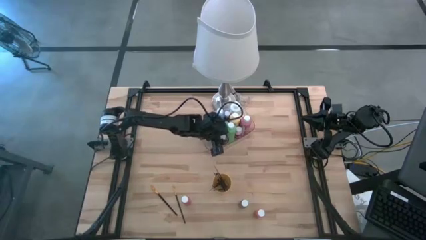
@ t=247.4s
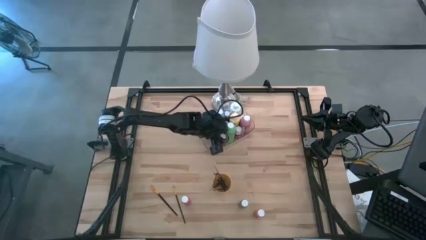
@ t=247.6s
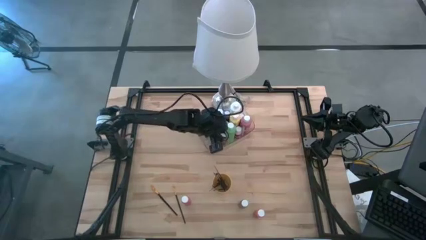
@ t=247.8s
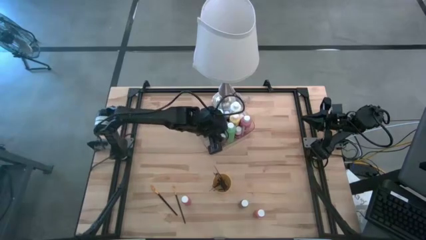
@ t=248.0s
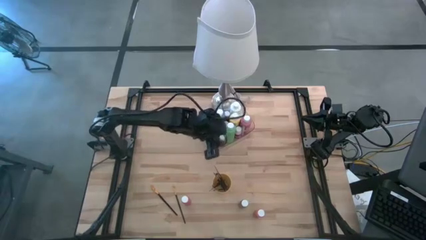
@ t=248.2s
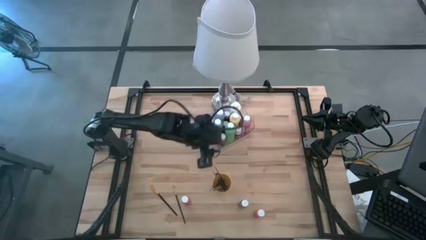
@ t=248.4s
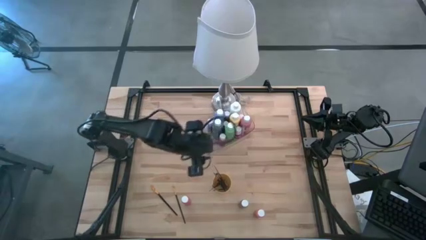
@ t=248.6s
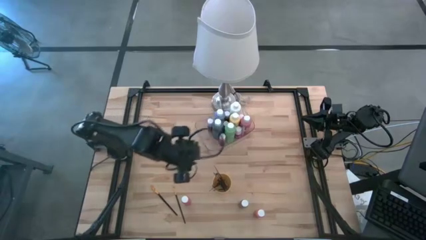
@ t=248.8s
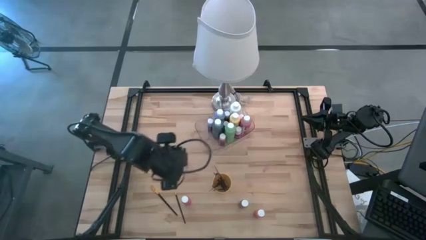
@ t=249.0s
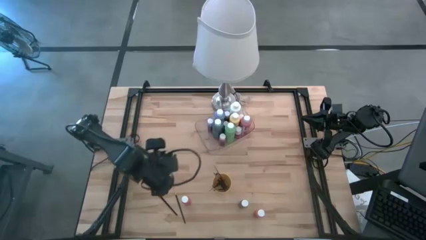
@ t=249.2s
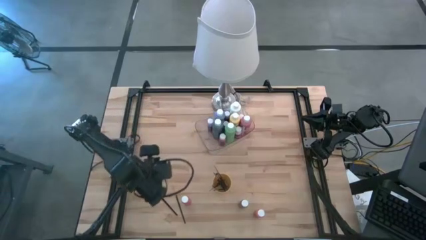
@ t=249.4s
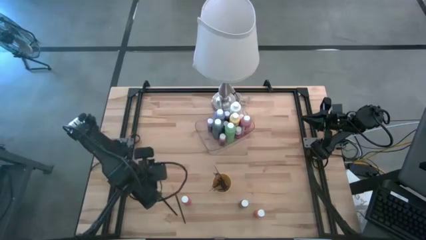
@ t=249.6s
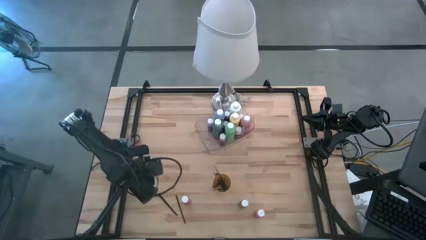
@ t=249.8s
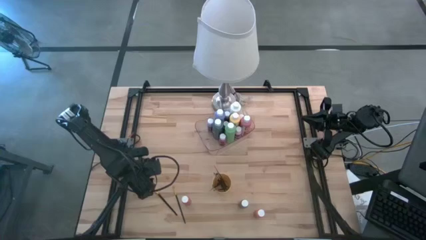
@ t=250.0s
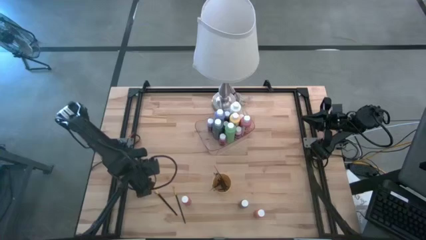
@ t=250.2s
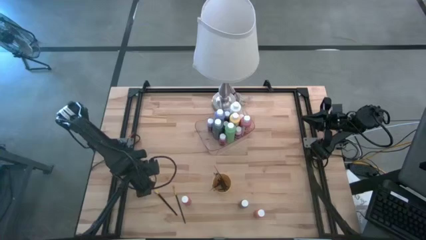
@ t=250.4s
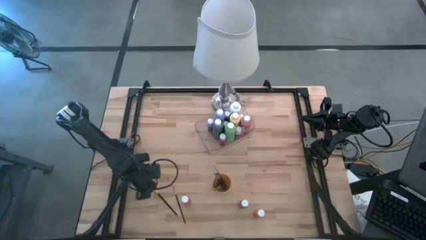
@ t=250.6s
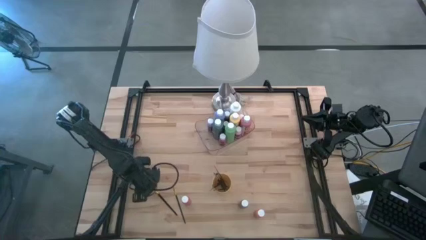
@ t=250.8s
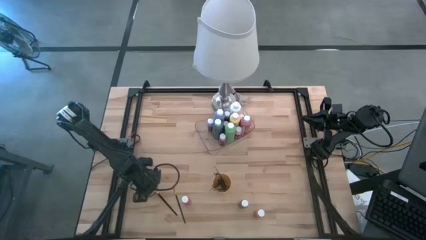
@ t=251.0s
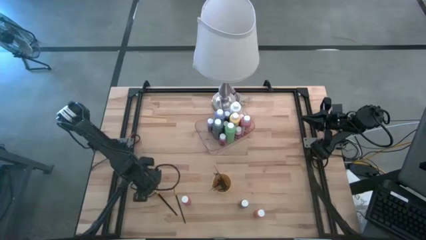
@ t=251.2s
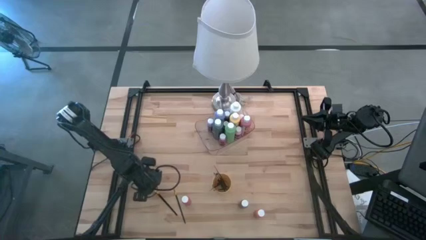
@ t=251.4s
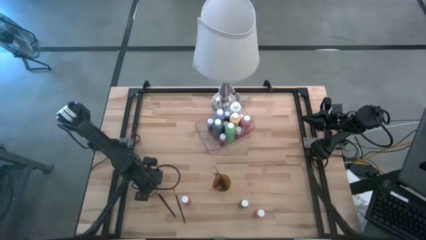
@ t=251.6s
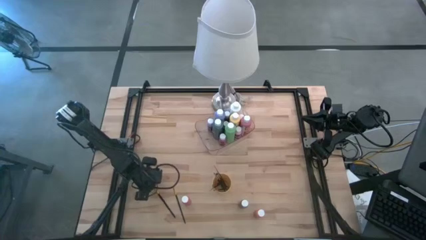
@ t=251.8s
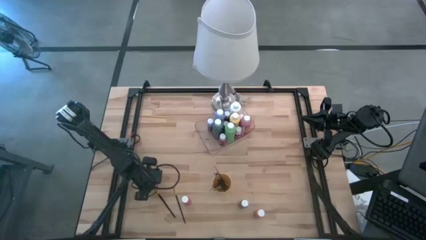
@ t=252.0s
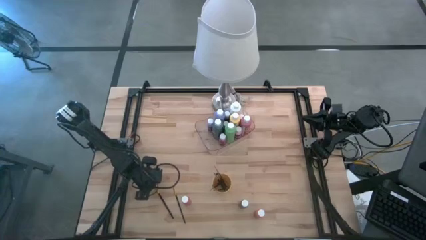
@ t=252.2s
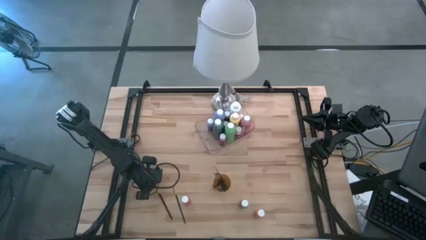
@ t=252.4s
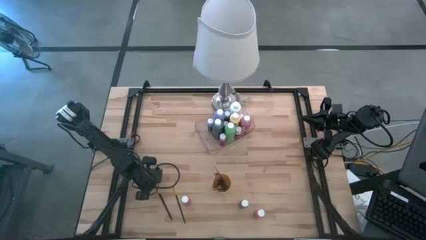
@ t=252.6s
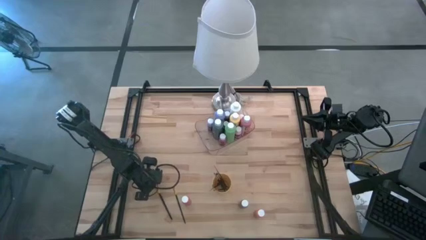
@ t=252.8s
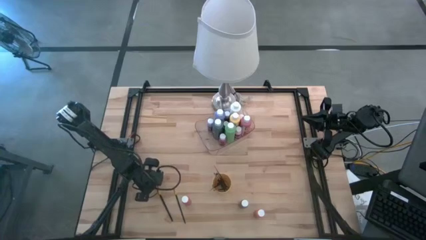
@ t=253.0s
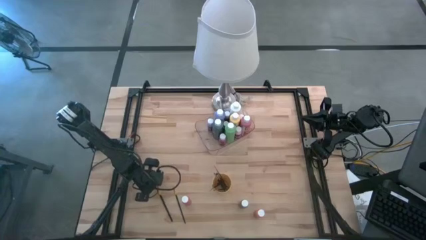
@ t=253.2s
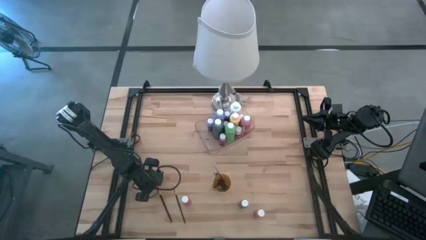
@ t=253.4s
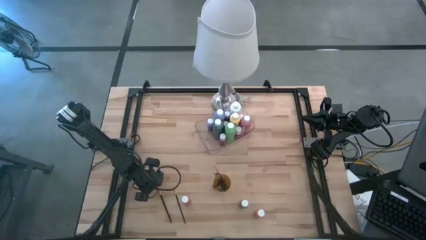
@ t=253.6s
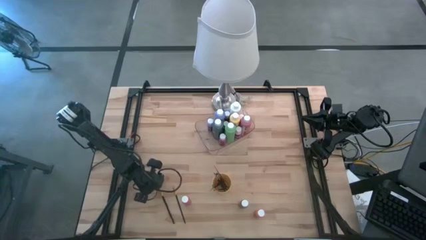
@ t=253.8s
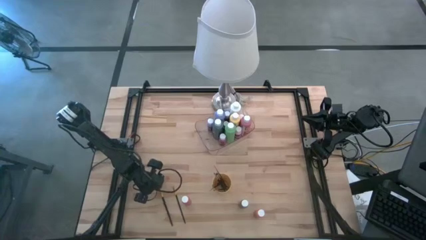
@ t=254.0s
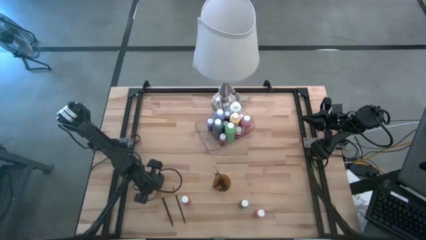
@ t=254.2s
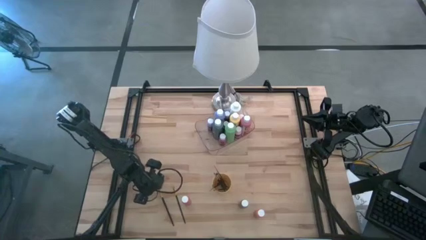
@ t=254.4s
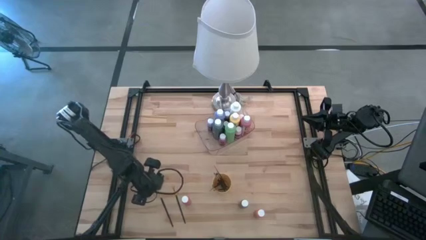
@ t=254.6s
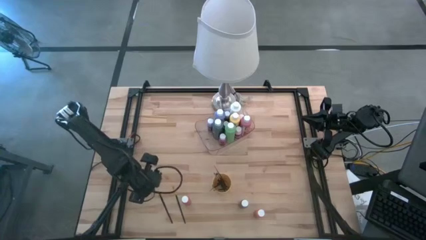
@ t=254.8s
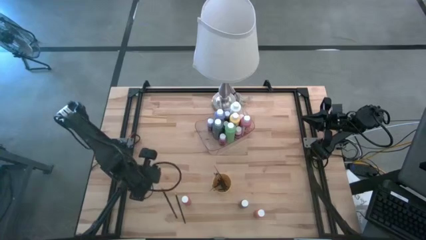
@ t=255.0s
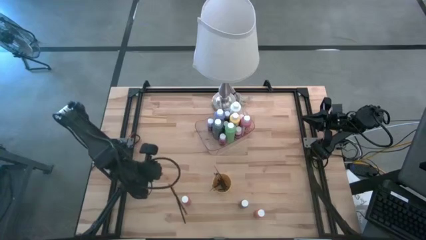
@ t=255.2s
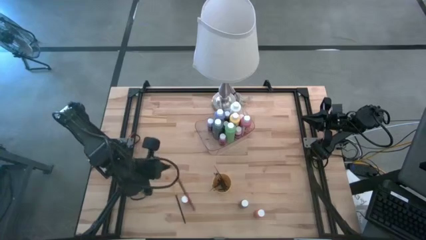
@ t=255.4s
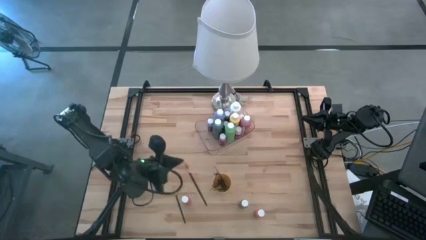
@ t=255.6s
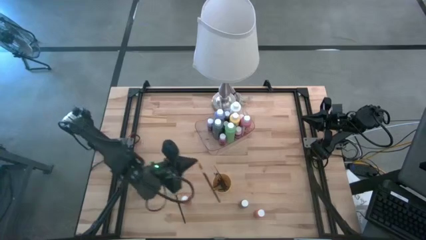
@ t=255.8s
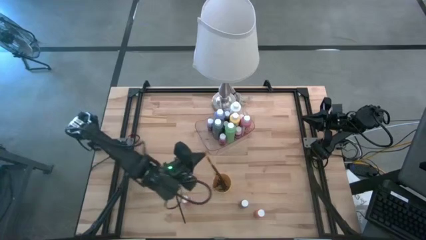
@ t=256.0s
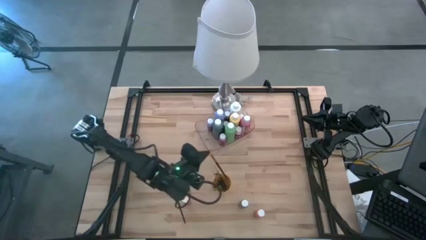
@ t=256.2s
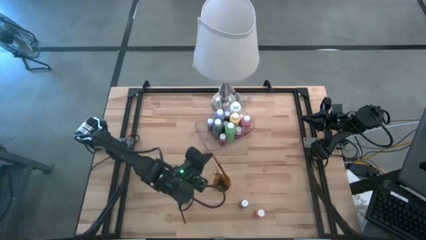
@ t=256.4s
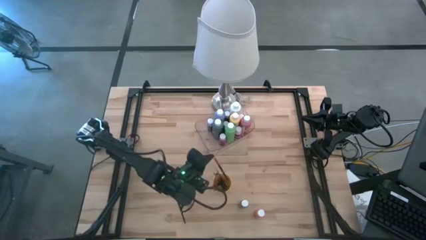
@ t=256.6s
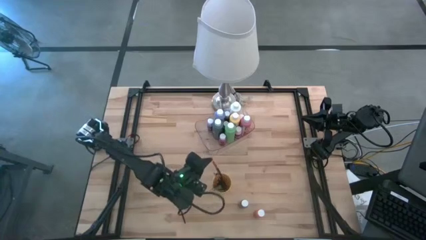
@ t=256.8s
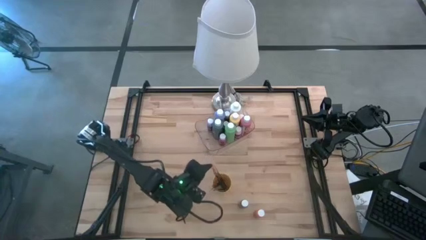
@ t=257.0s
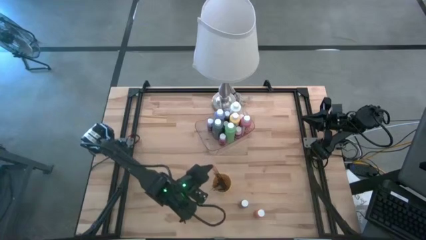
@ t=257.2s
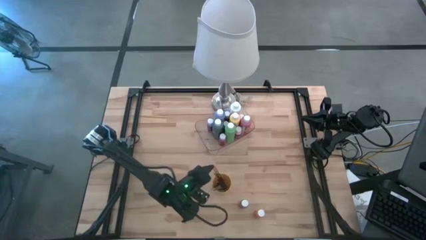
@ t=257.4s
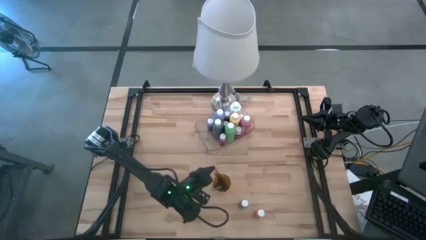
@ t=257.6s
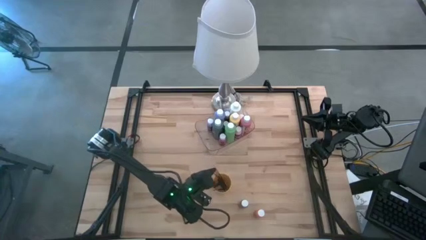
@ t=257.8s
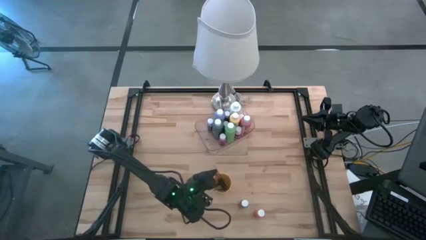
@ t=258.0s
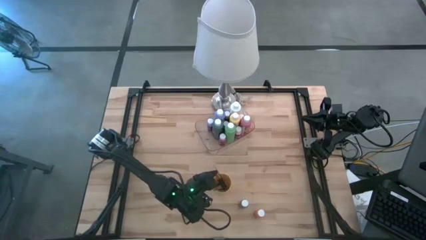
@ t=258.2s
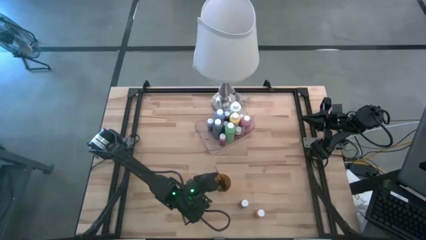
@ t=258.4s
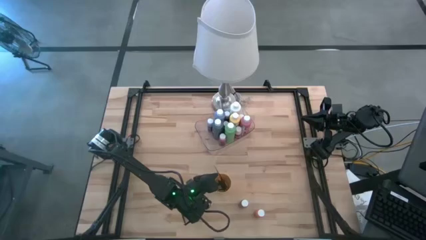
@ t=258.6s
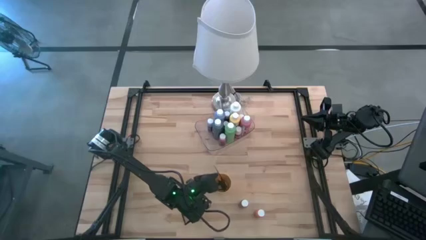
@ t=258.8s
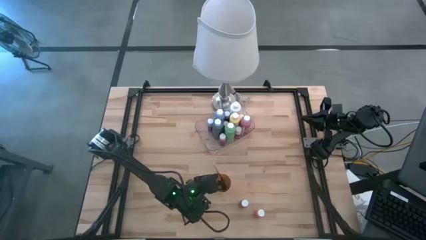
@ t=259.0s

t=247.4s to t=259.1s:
Task: Pick & Place Paint Supplies
Put the black paint brush into the yellow cup
